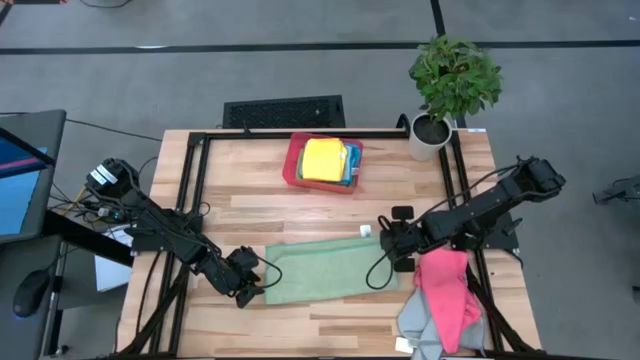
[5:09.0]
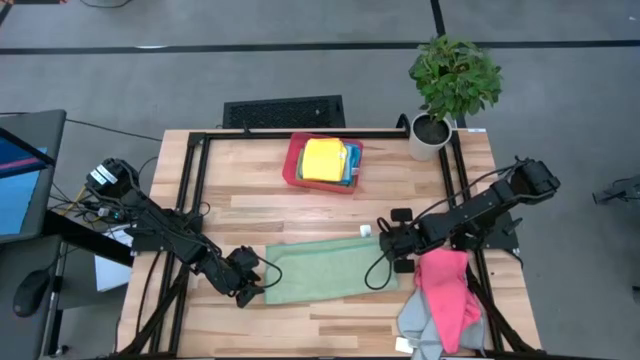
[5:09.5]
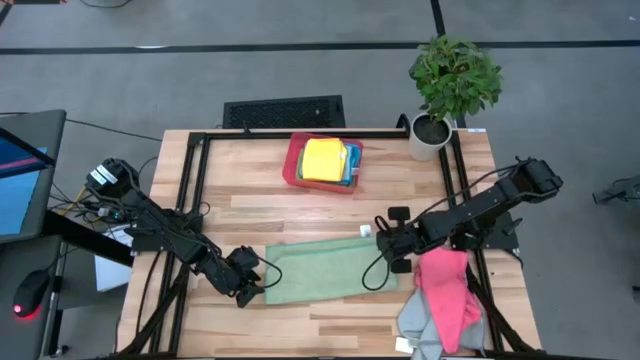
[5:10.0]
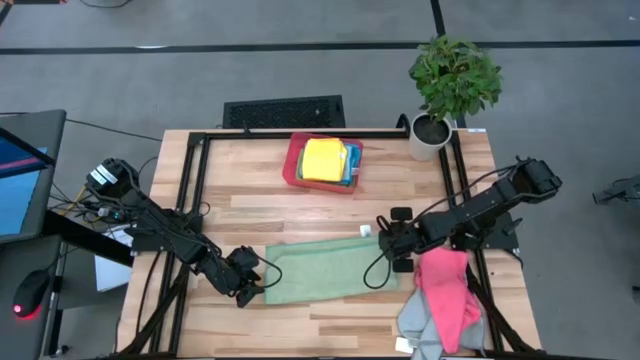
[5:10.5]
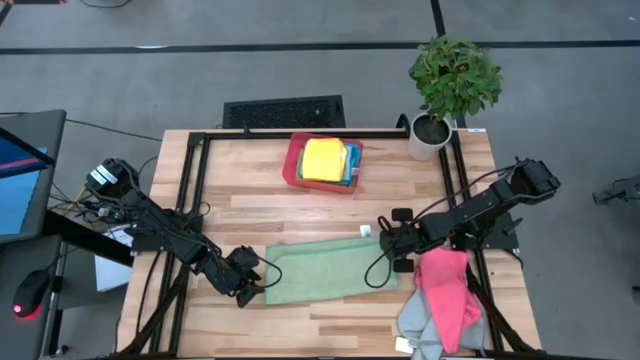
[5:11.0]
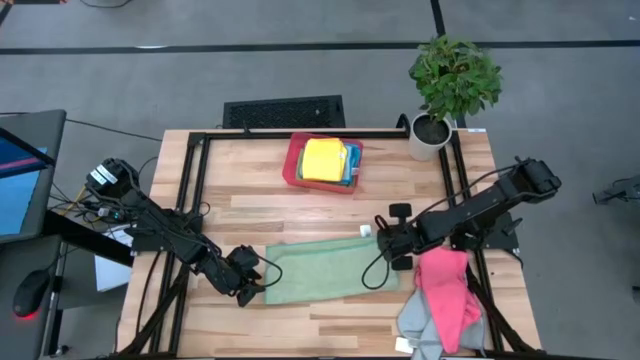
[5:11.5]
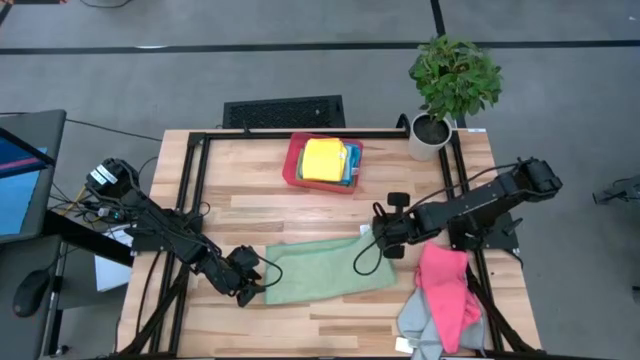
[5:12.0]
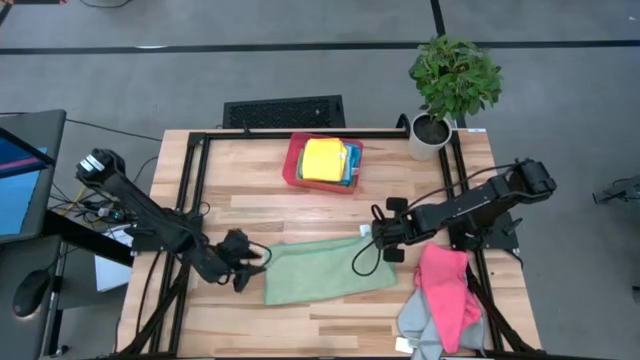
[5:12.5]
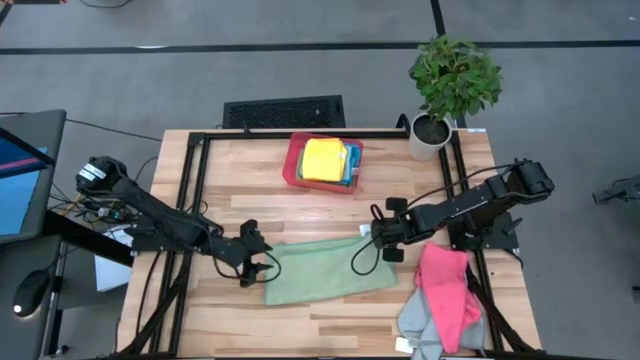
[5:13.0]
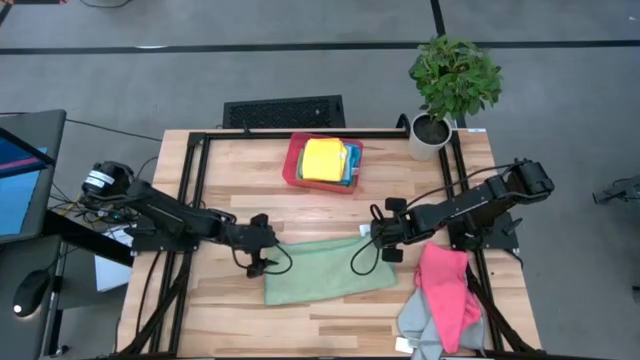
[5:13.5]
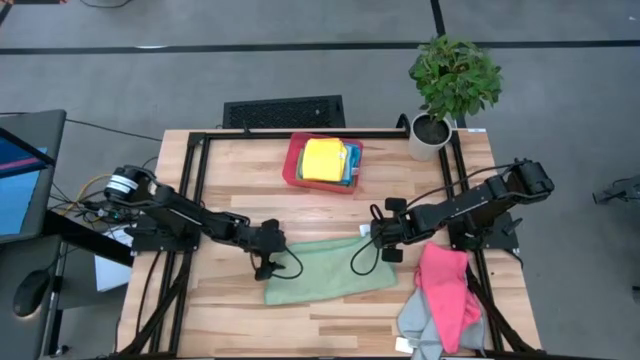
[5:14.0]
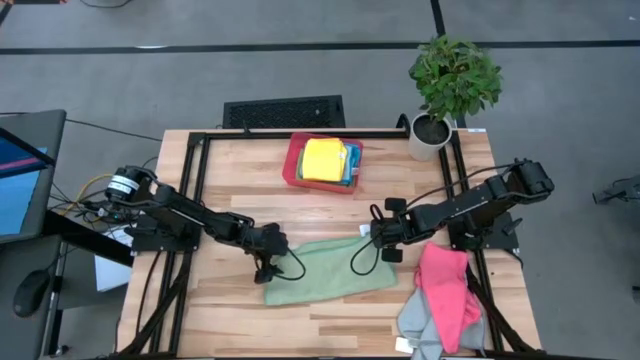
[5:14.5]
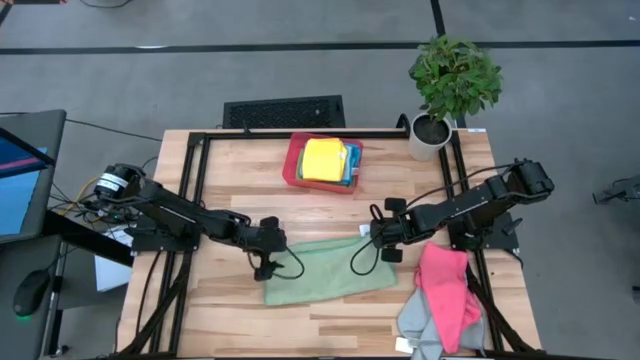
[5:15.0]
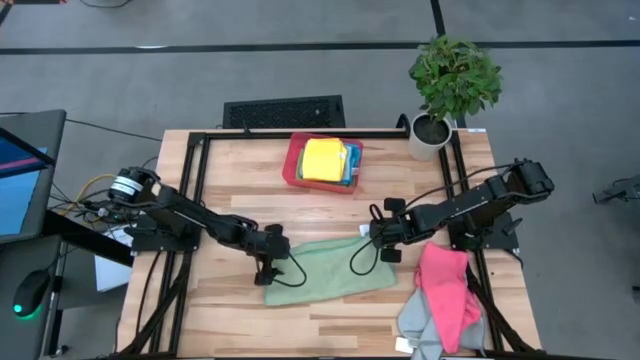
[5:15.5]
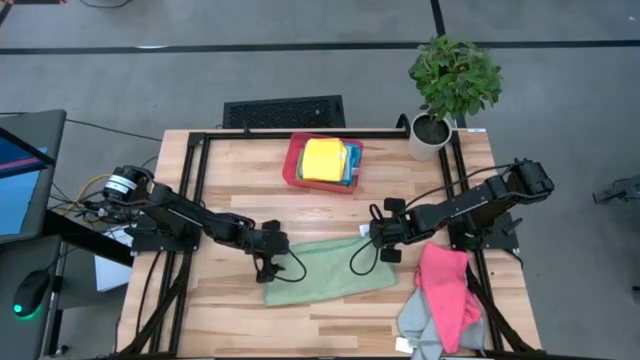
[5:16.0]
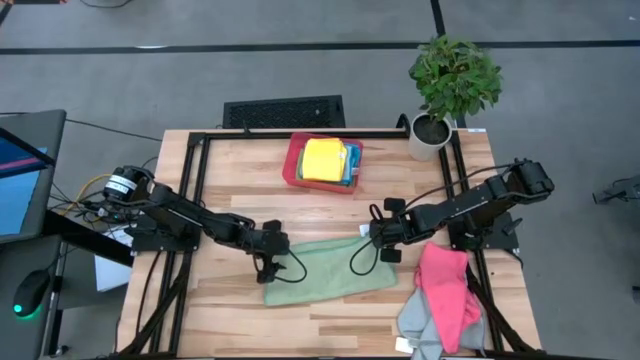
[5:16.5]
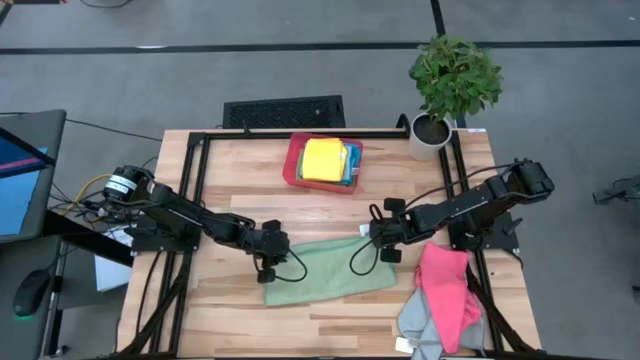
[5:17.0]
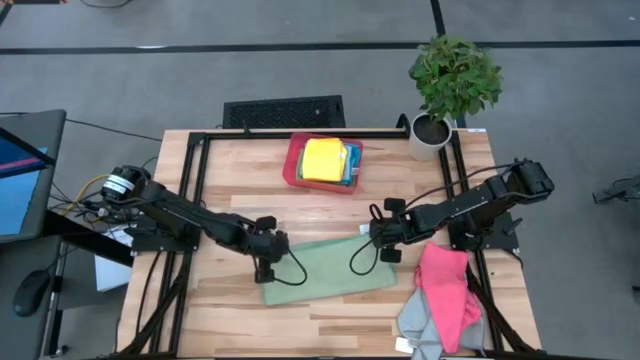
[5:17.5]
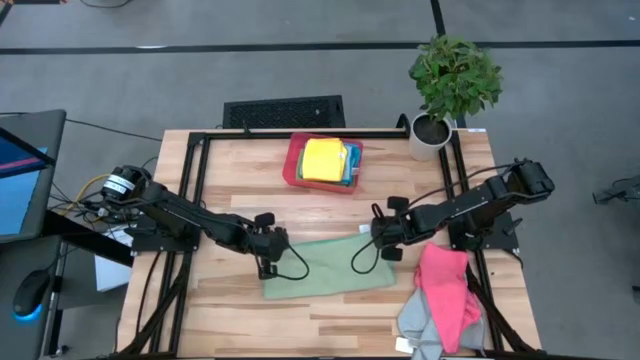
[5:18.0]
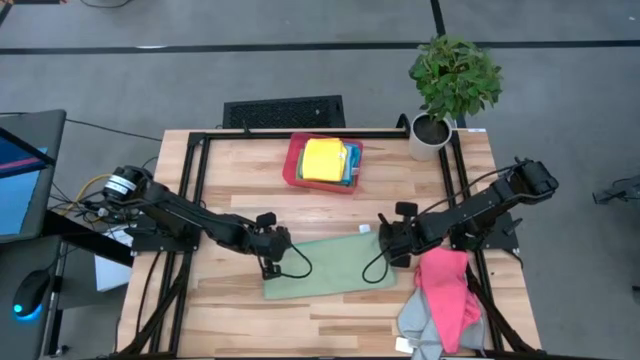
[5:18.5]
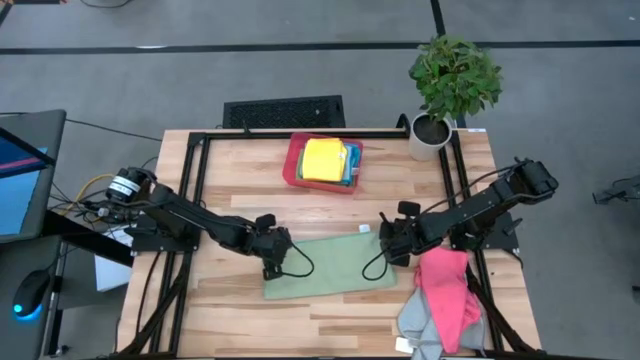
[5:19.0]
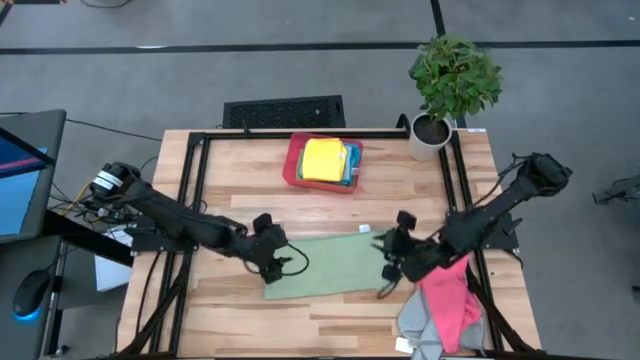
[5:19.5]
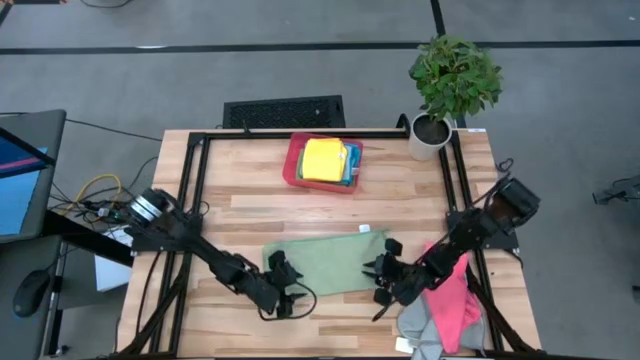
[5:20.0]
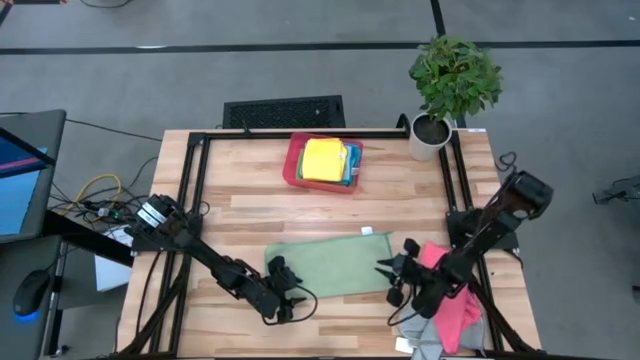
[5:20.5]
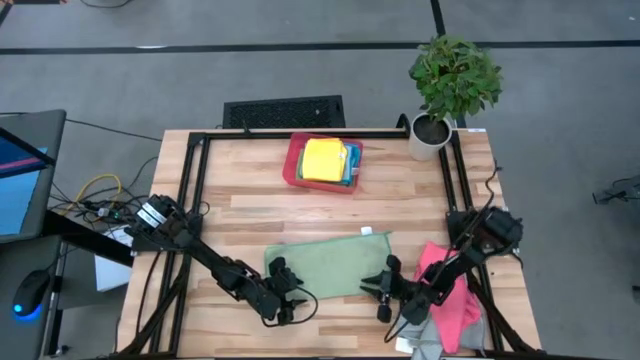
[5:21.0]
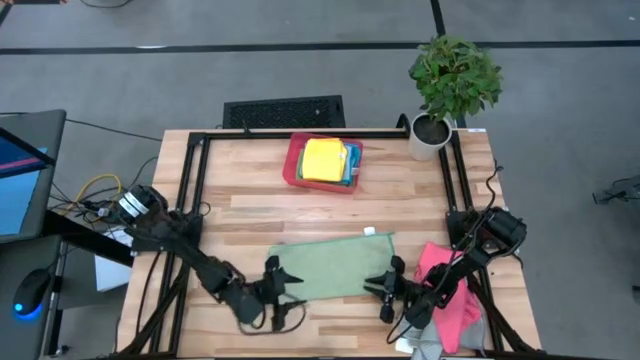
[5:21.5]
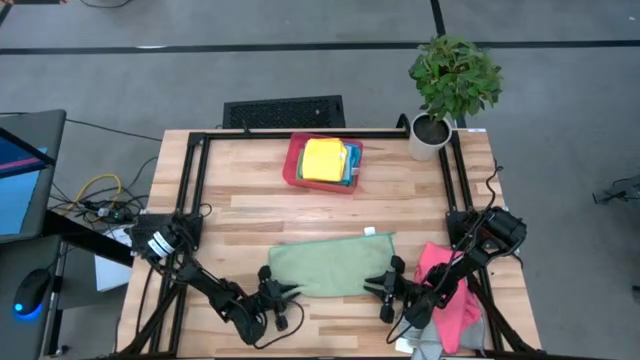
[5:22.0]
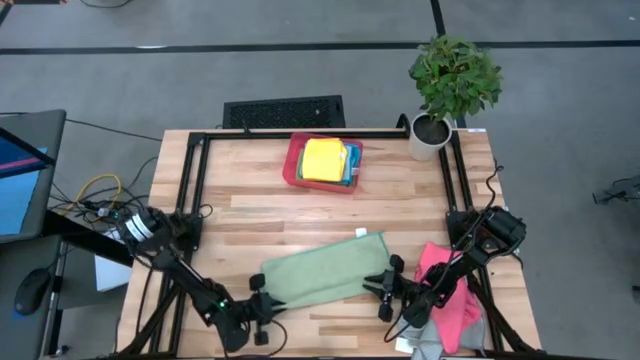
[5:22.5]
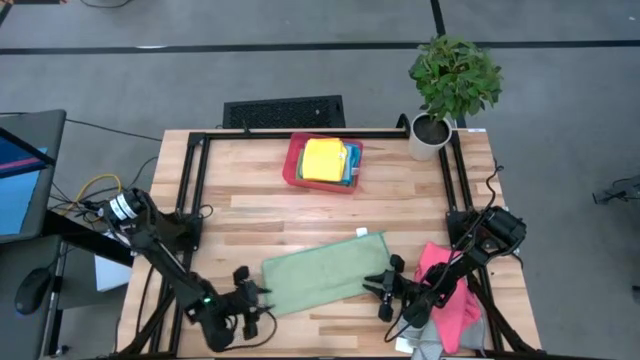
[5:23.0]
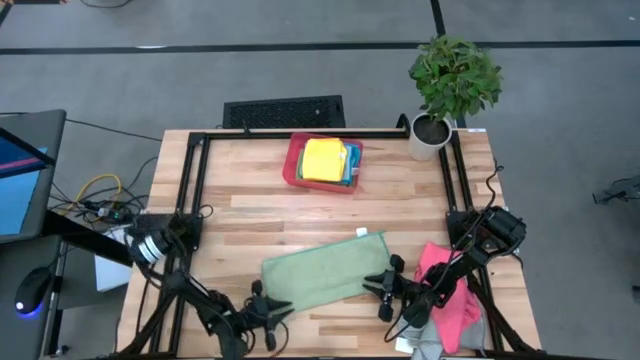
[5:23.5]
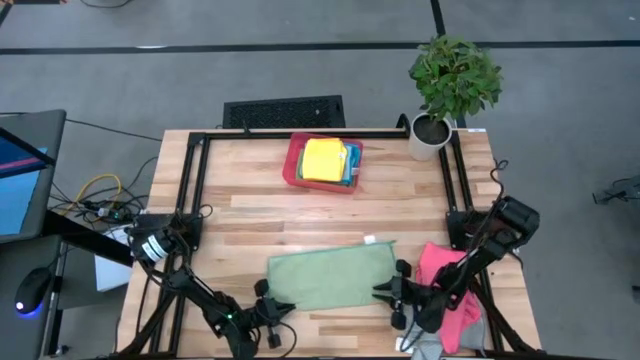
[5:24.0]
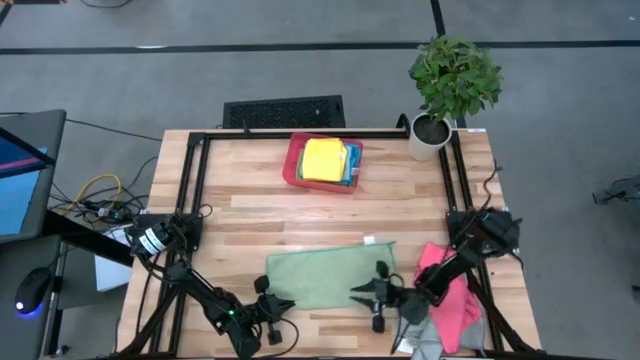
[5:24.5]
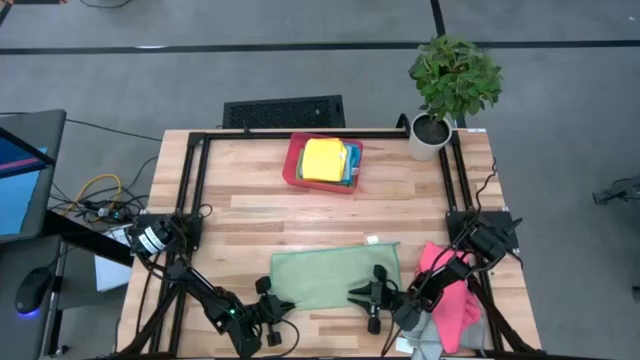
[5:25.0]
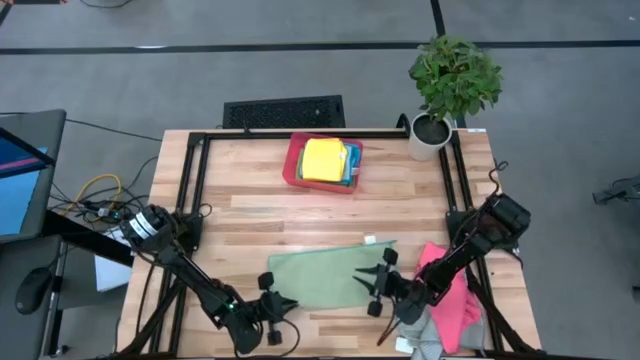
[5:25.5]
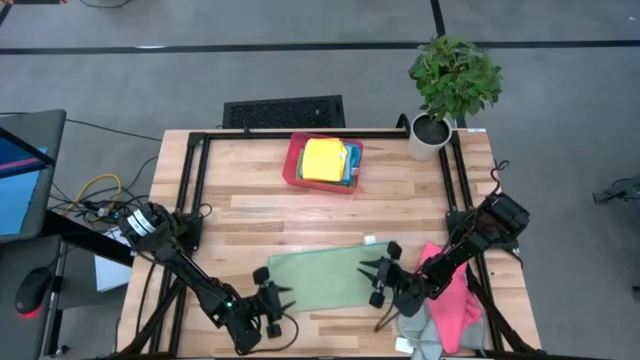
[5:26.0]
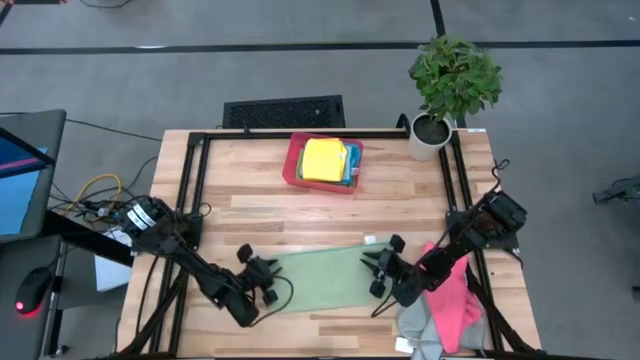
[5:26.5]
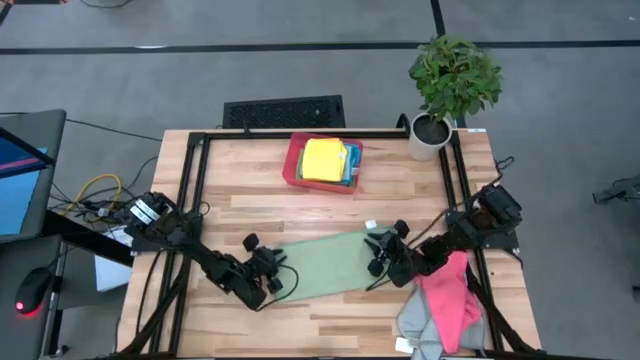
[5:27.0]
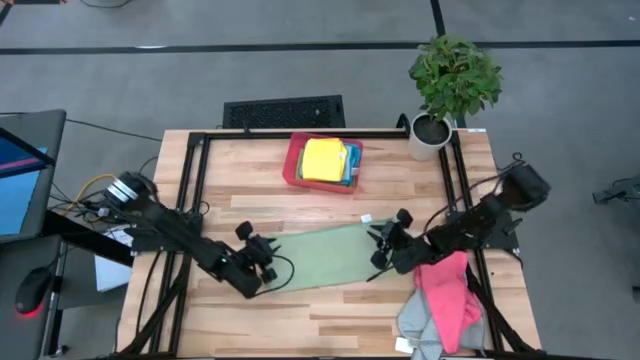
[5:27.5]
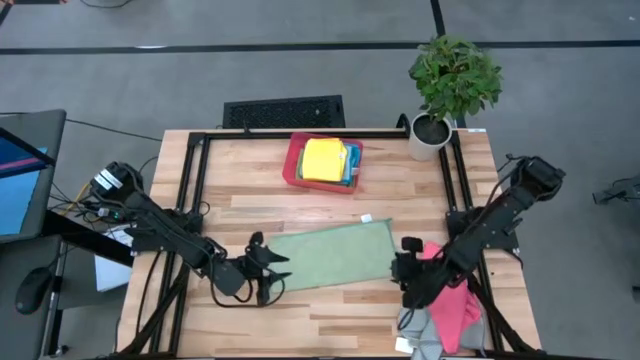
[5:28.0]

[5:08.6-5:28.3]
Task: Fold microfiber towels
Fold the green microfiber cloth

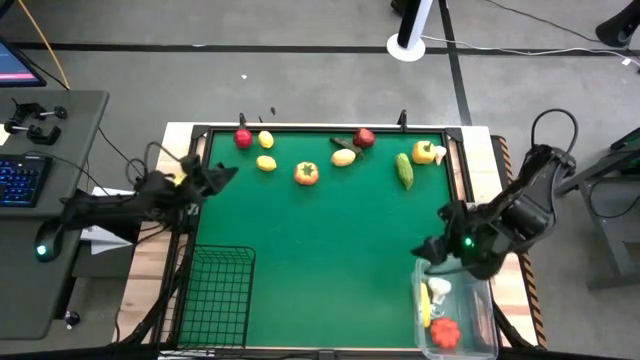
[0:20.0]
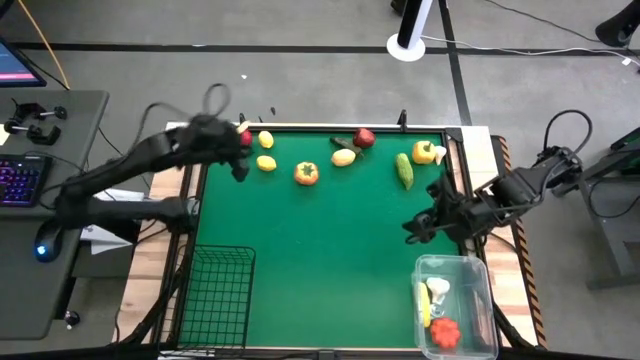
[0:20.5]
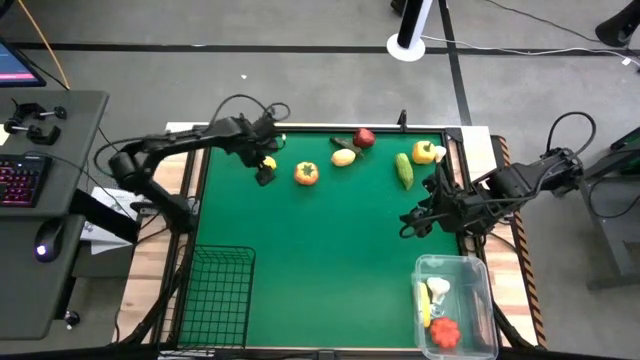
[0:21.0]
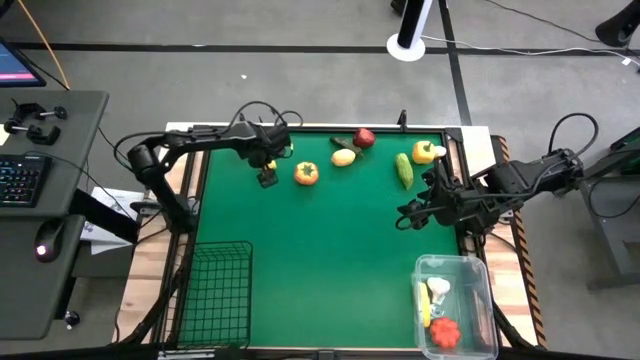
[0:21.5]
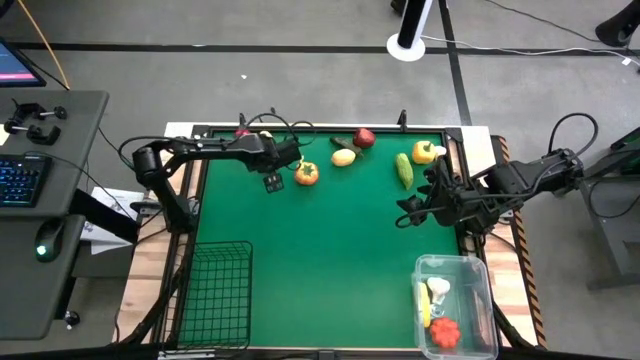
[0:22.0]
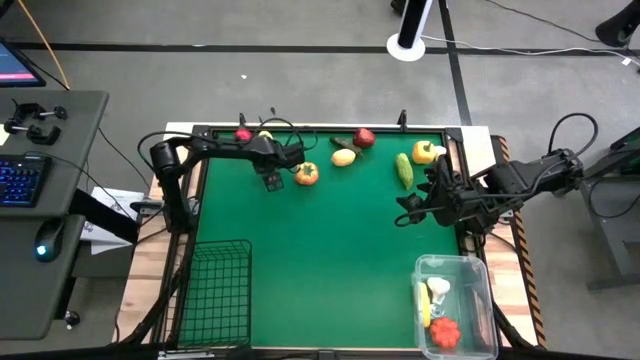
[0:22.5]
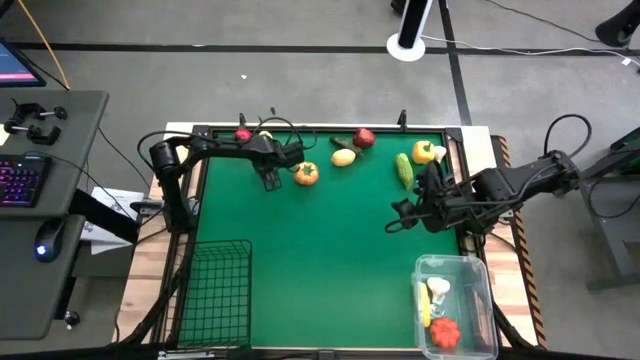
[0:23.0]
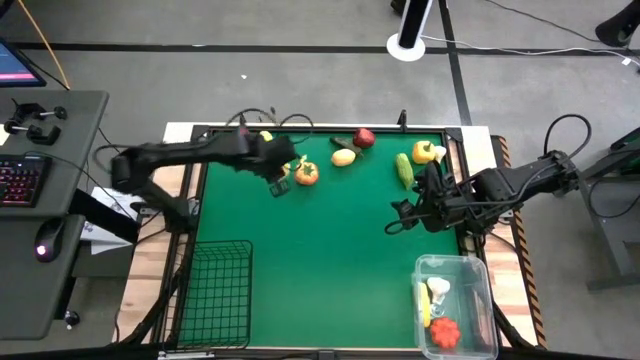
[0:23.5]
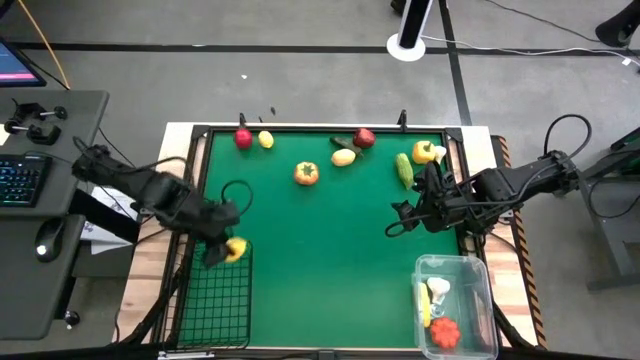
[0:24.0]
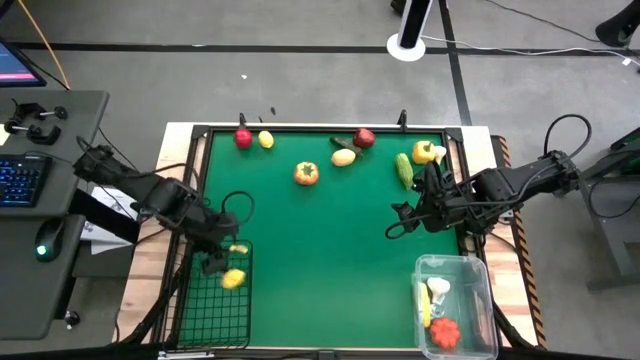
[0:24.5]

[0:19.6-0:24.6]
Task: Sort produce into baskets
Put the yellow lemon into the black wire basket
